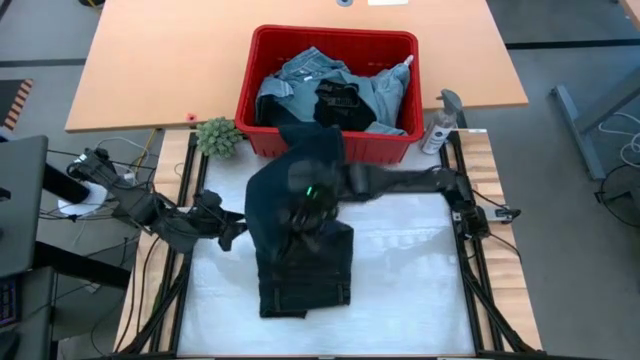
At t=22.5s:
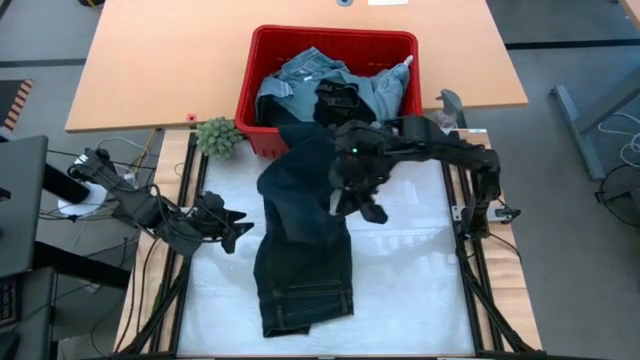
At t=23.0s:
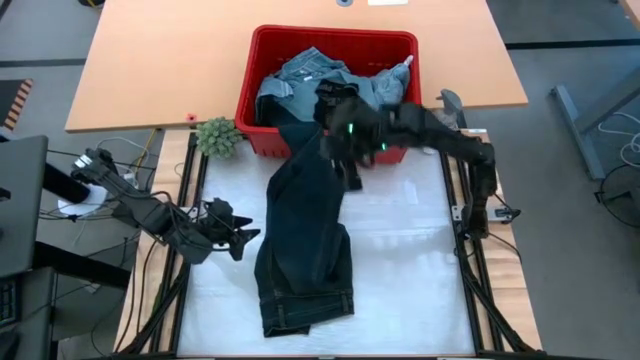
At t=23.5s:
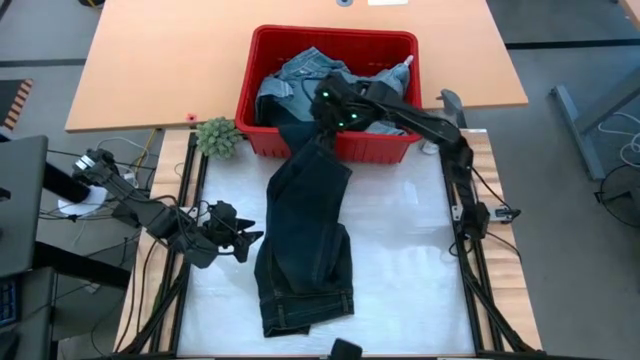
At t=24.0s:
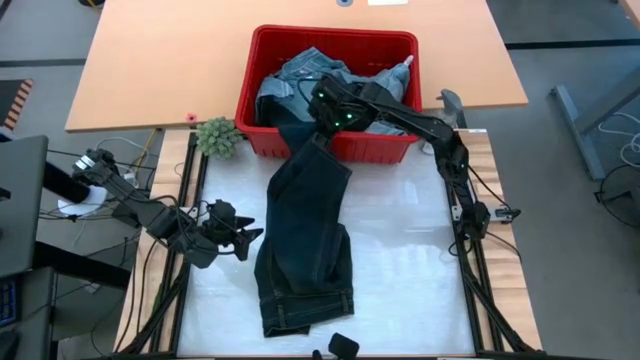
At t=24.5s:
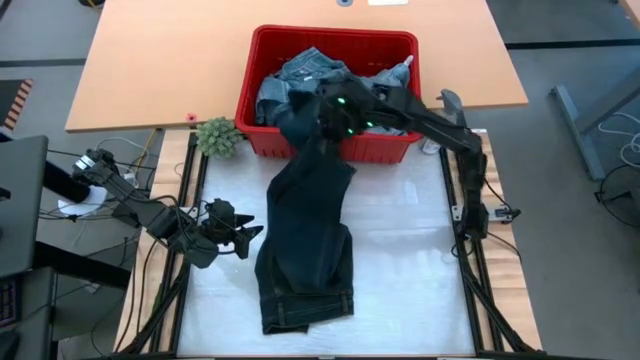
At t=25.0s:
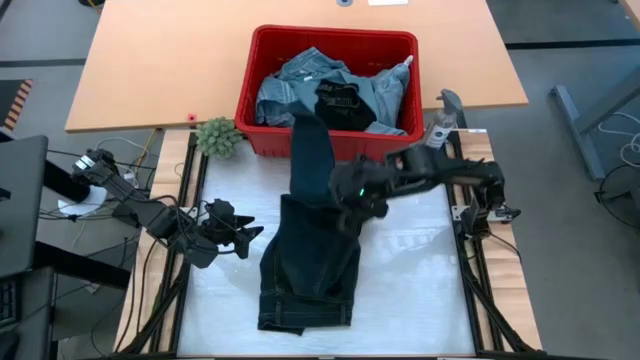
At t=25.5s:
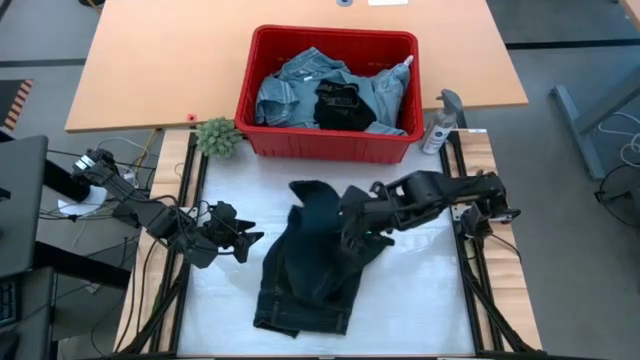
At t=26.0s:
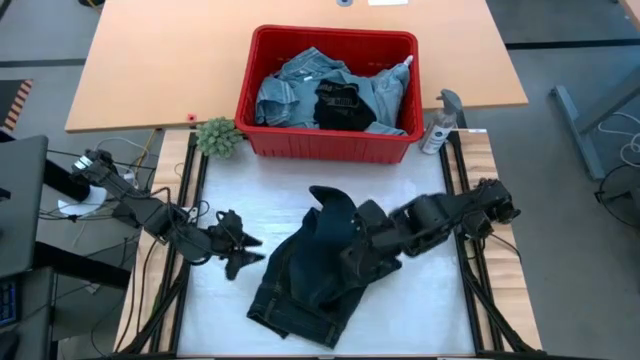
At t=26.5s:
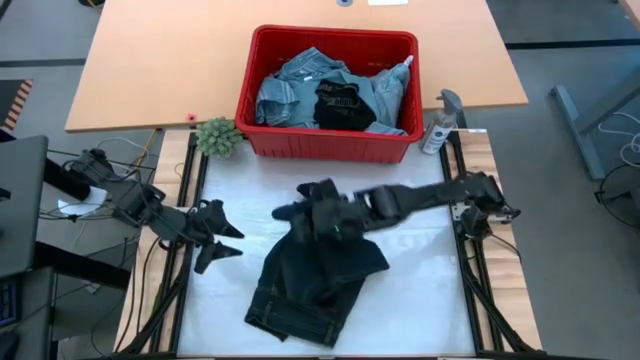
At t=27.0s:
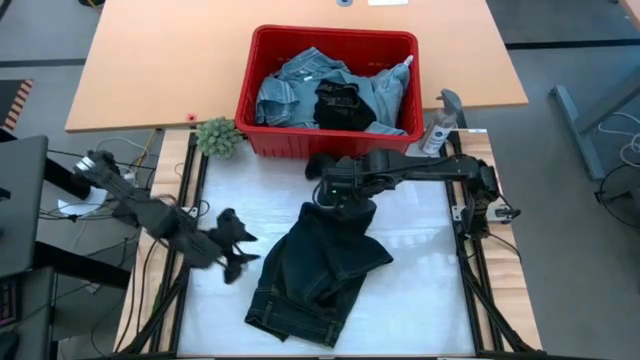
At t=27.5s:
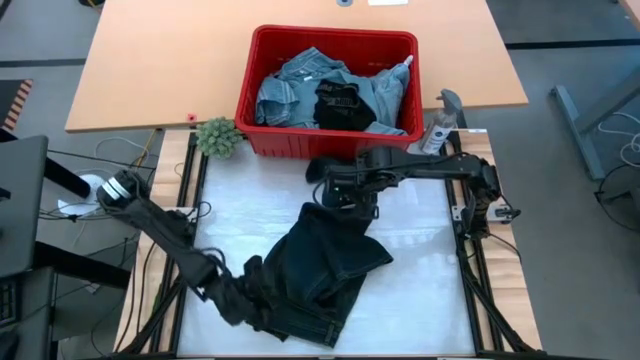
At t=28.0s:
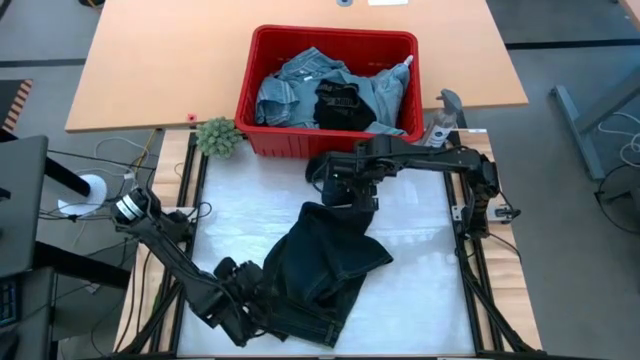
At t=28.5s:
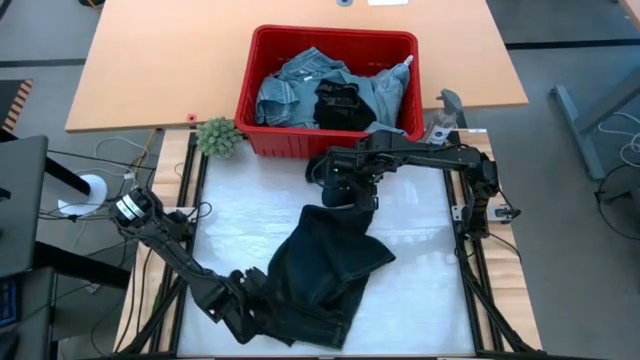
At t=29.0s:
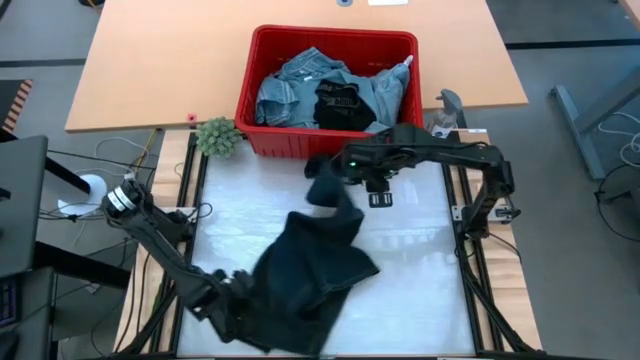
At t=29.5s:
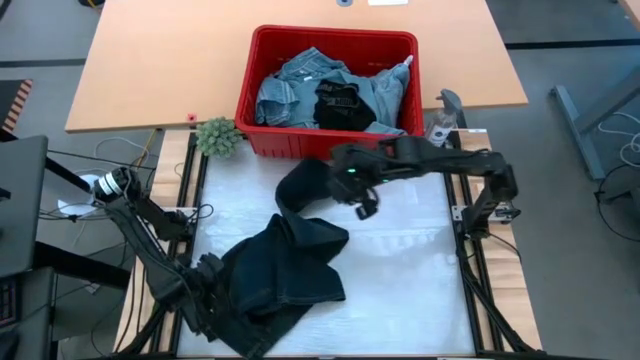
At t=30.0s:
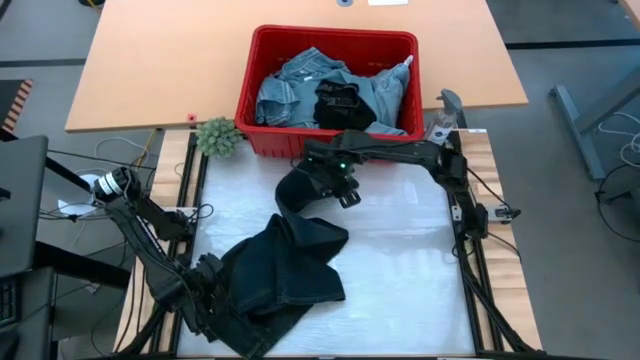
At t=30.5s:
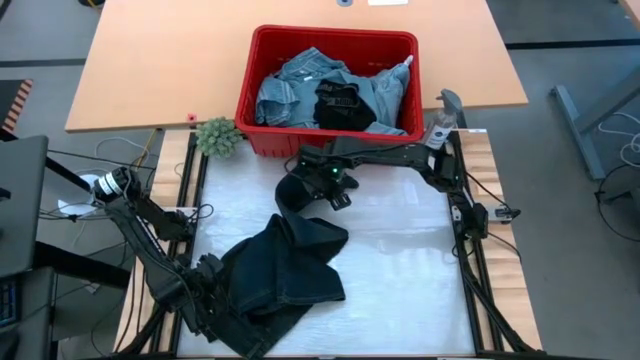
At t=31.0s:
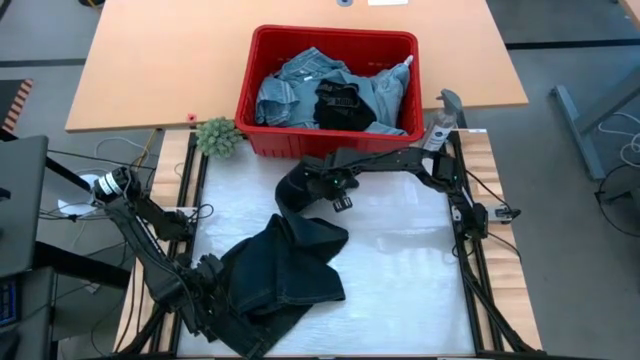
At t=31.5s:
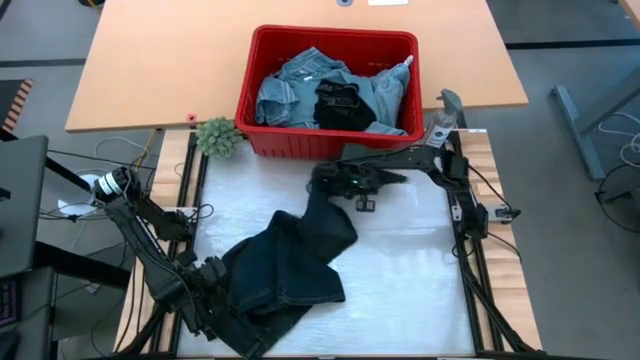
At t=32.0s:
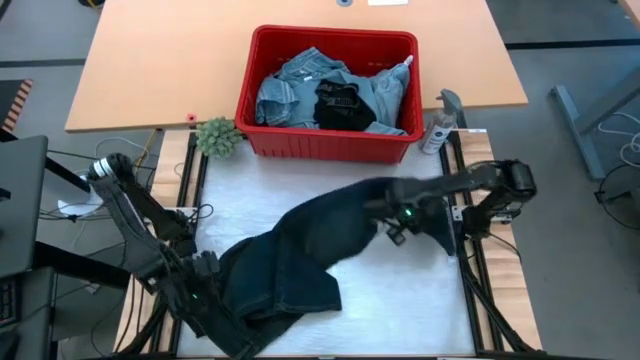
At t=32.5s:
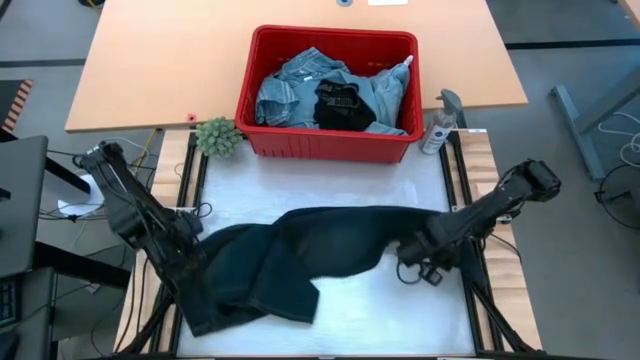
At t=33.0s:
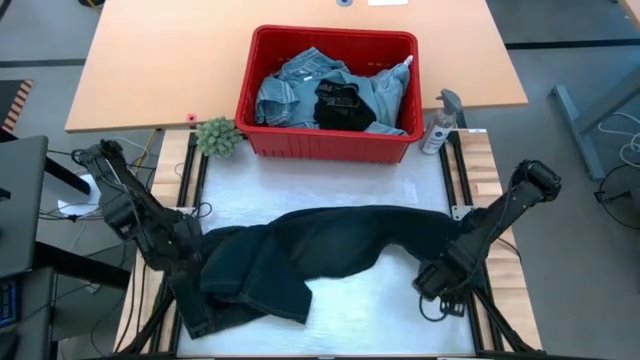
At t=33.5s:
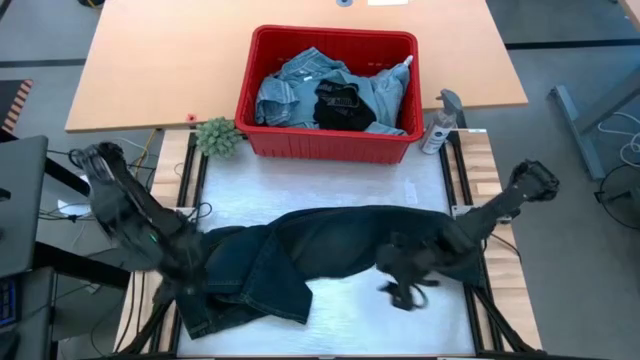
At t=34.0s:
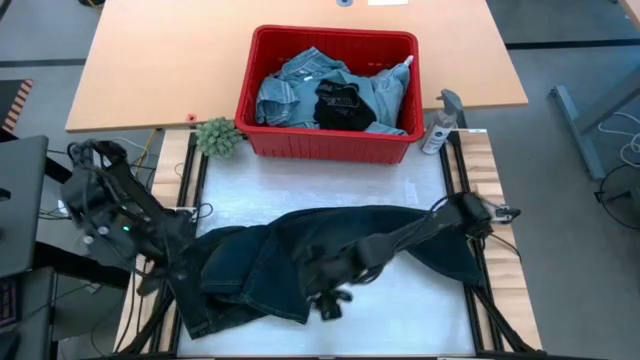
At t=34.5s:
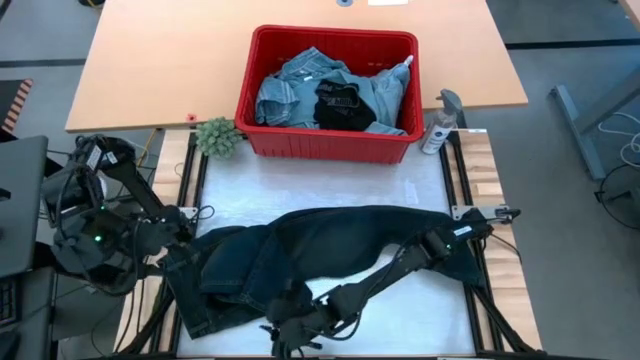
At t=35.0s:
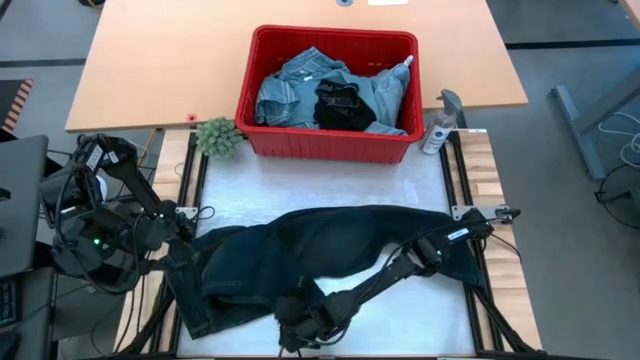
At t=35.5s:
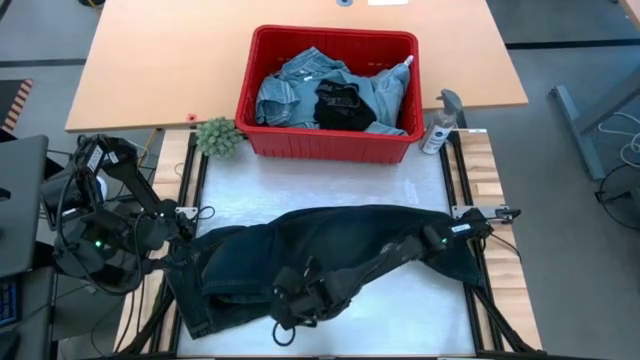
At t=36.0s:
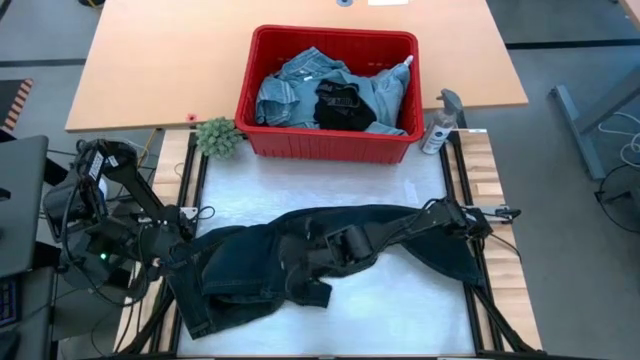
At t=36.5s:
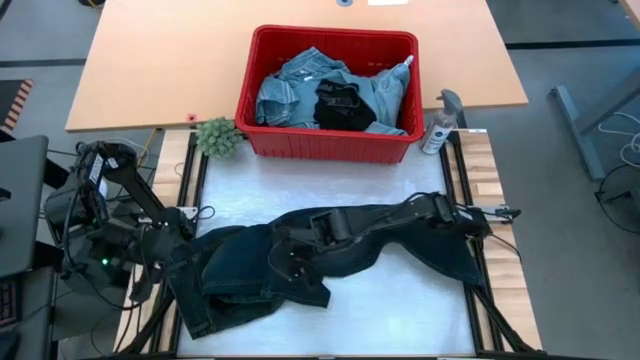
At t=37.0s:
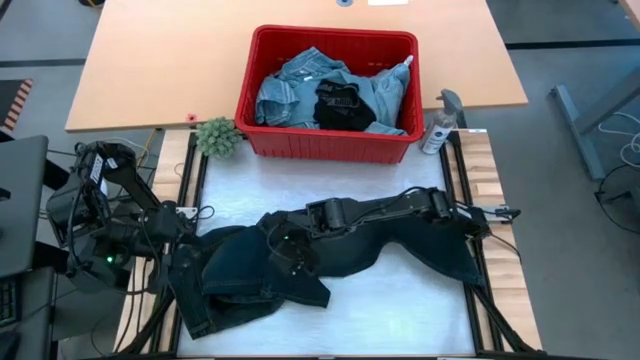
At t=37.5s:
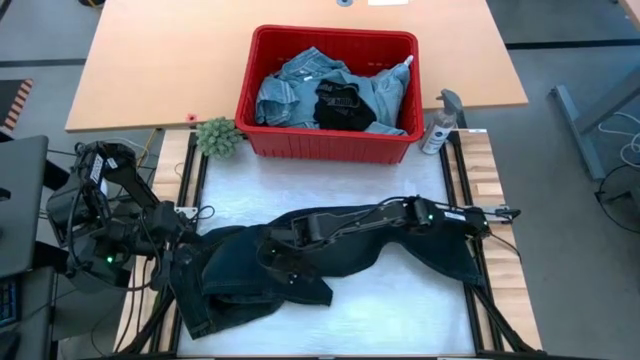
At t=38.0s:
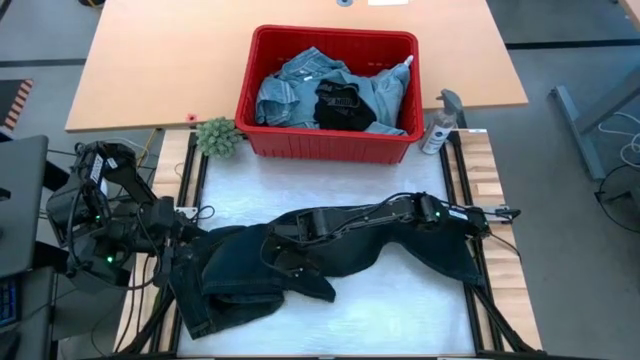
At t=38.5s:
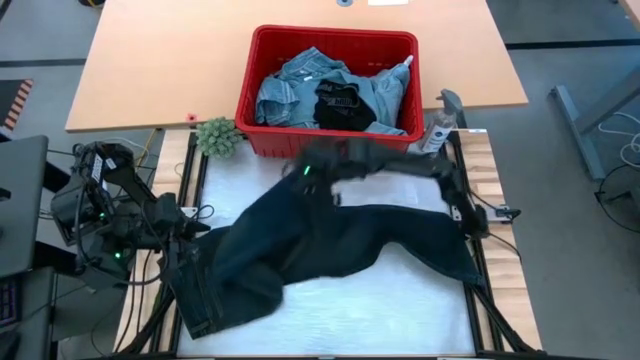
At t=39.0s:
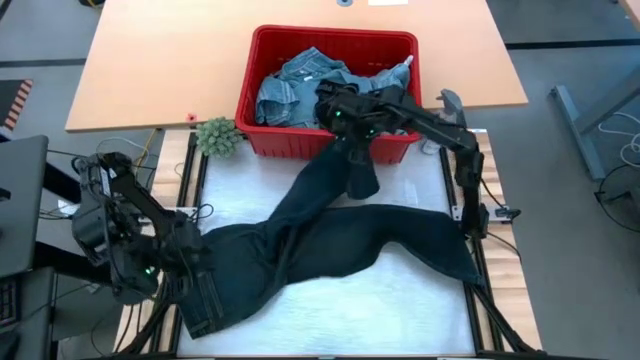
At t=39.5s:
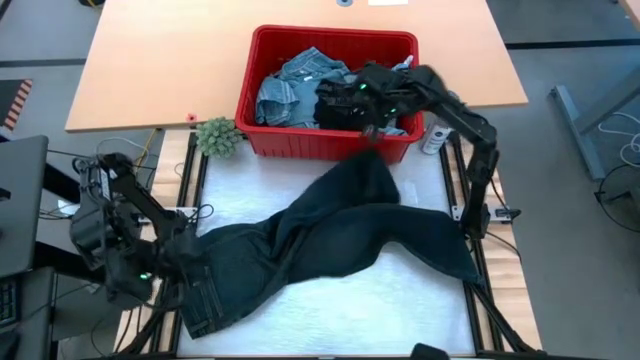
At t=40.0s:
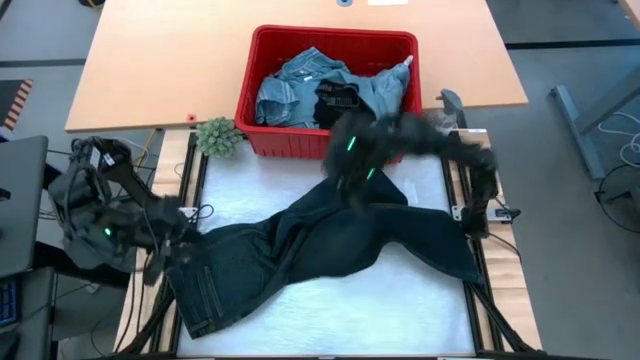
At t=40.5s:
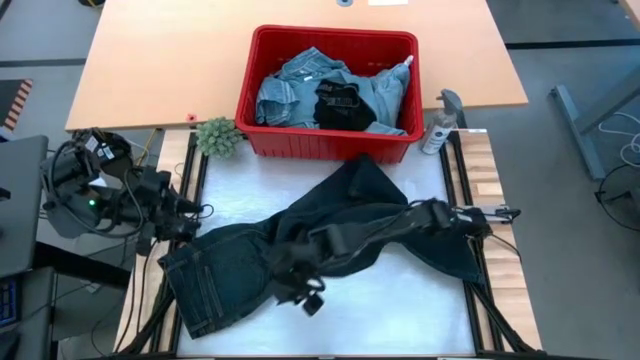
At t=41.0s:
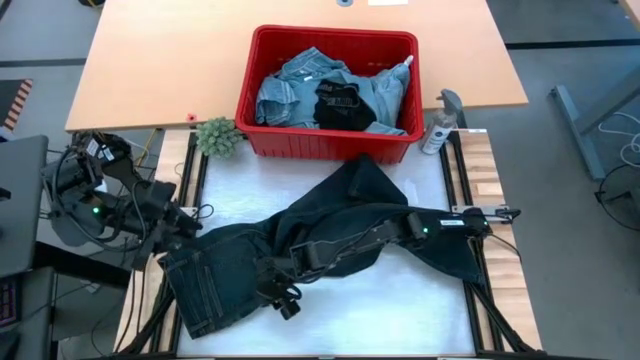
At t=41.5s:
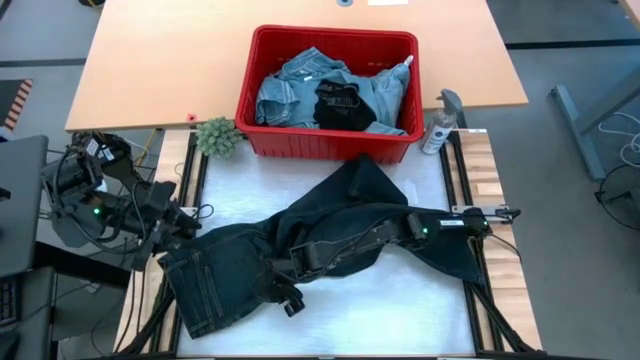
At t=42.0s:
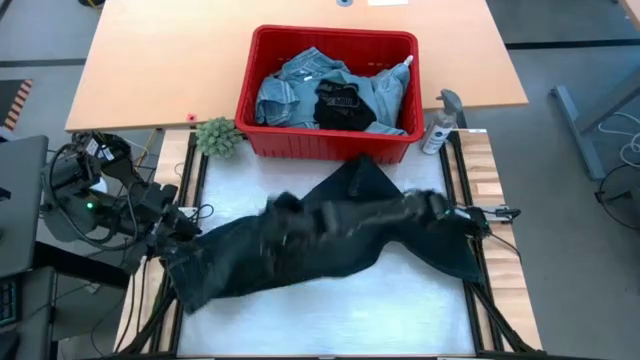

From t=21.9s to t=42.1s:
Task: Fold Laundry from Bin
Fold the black pants
